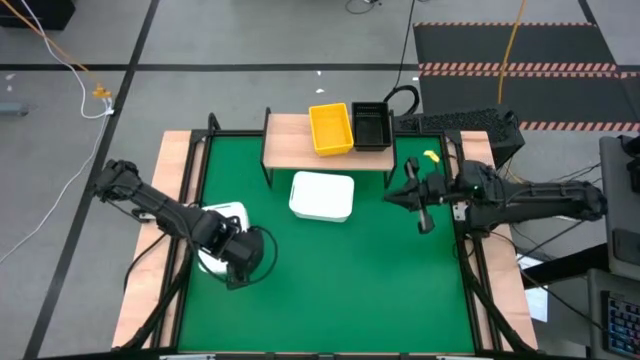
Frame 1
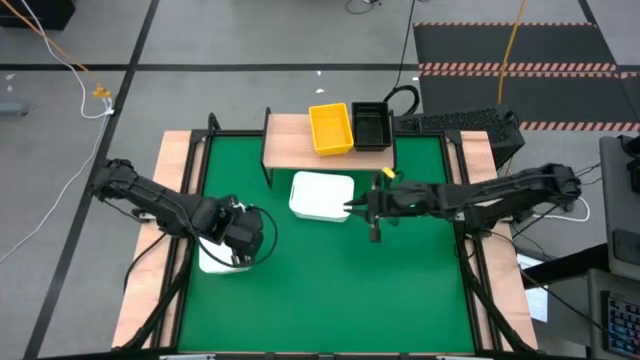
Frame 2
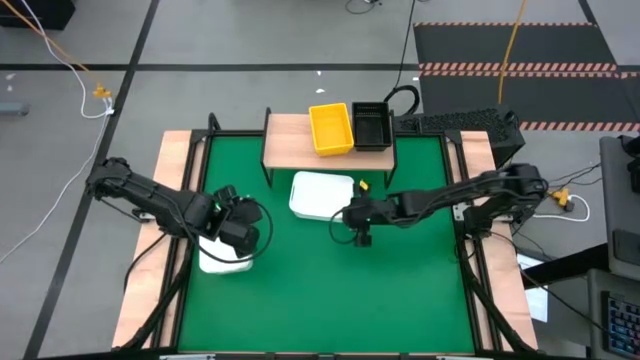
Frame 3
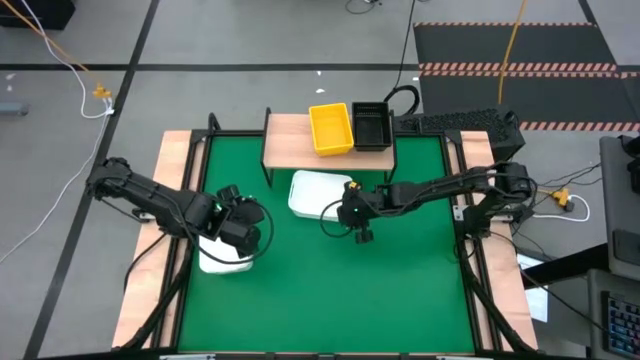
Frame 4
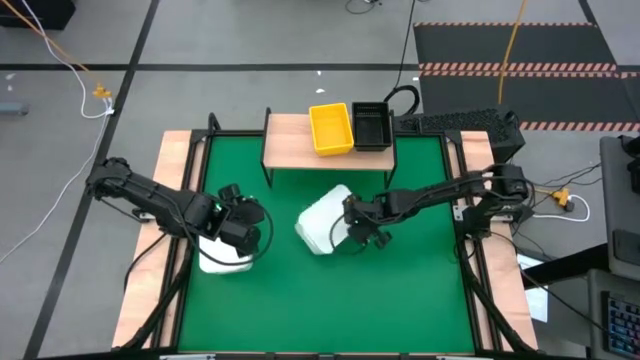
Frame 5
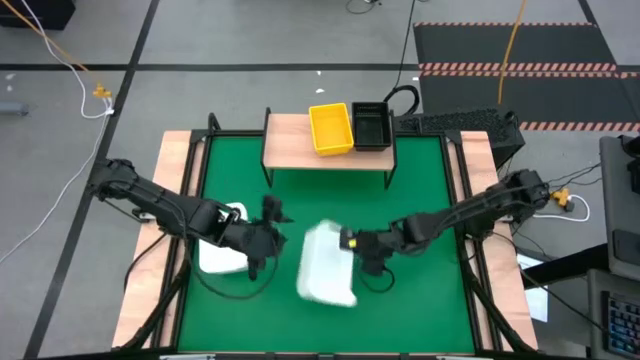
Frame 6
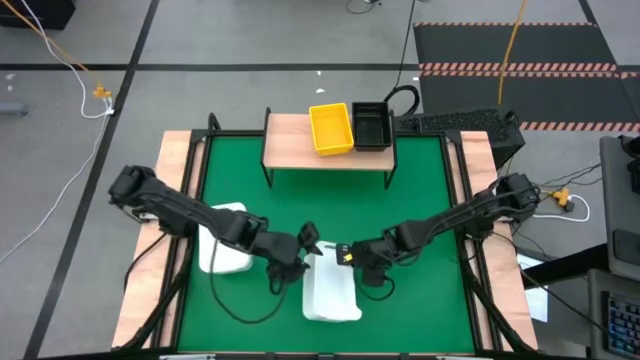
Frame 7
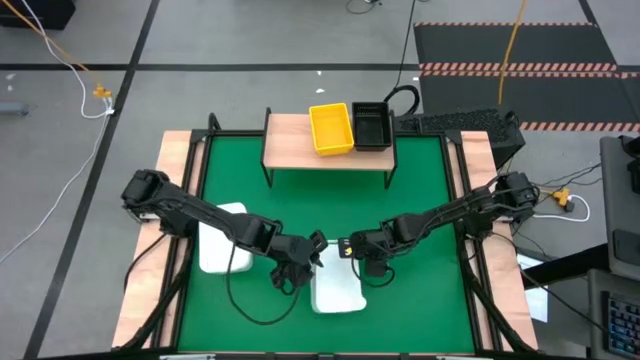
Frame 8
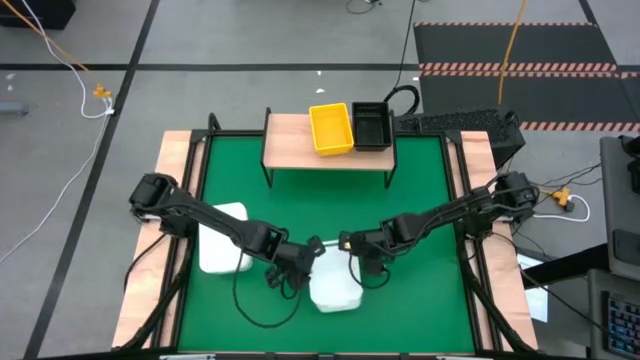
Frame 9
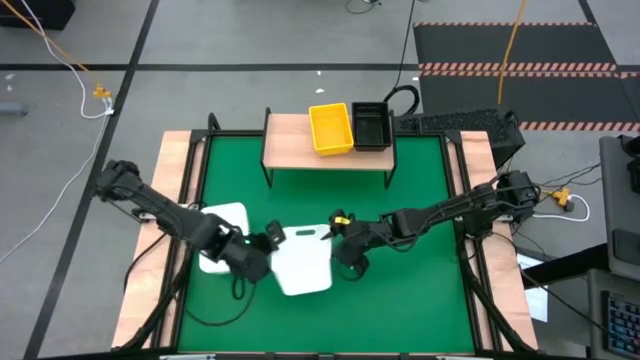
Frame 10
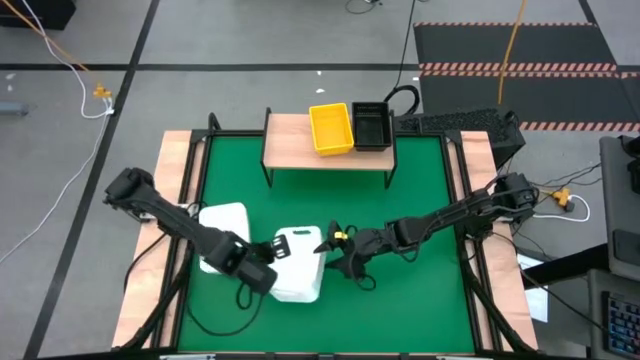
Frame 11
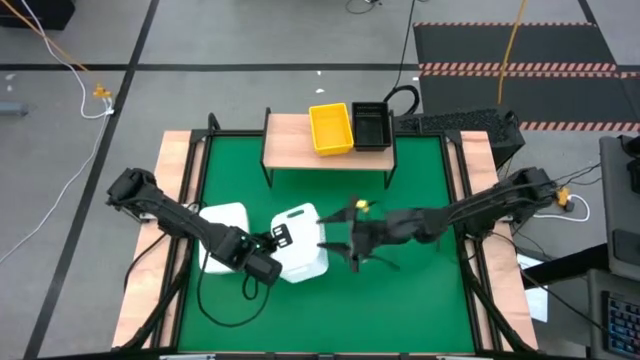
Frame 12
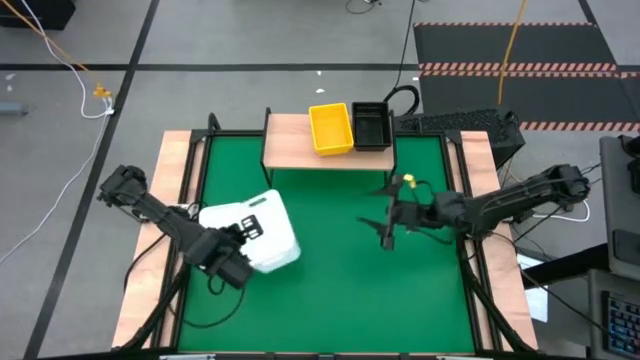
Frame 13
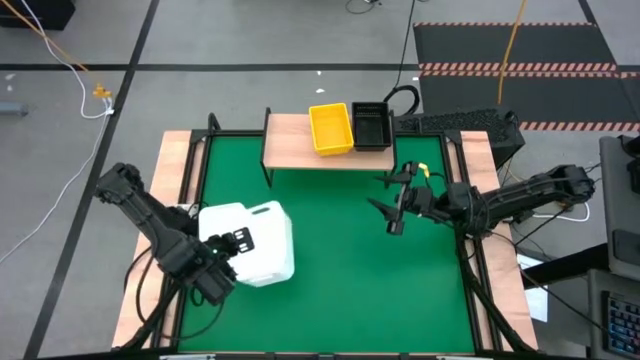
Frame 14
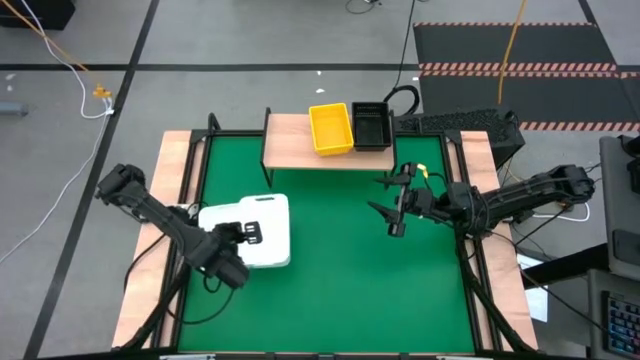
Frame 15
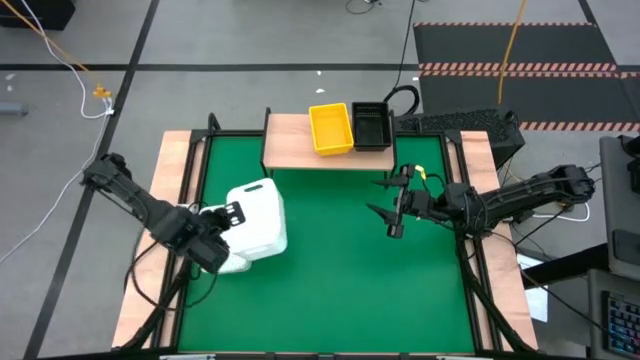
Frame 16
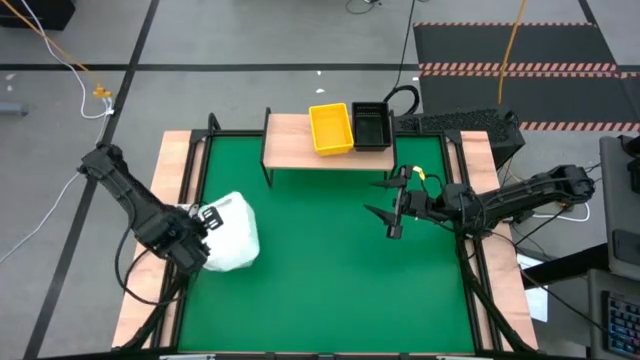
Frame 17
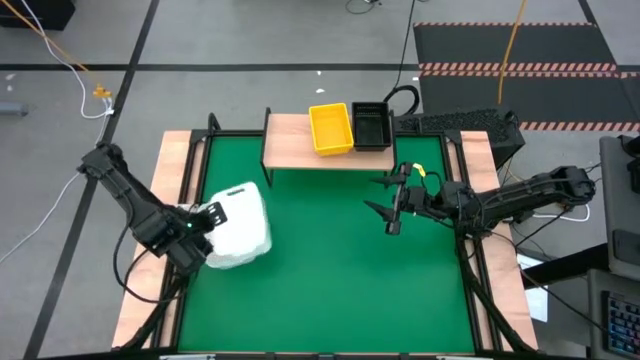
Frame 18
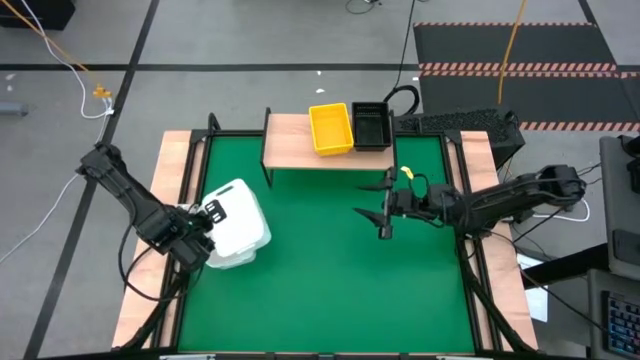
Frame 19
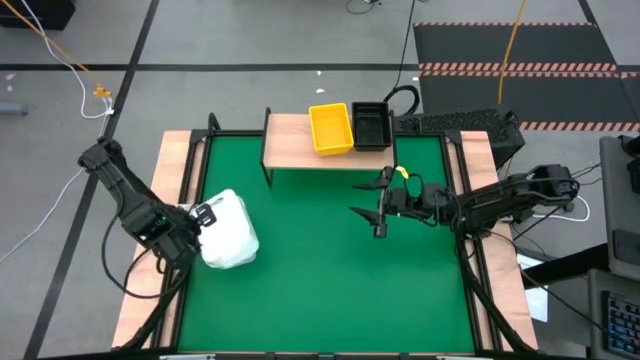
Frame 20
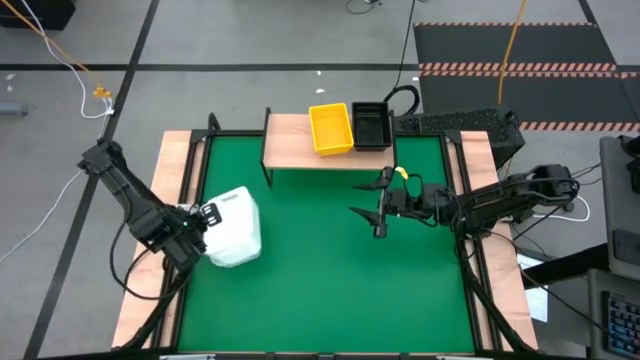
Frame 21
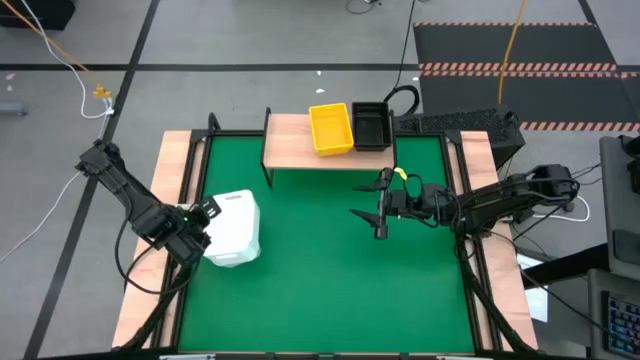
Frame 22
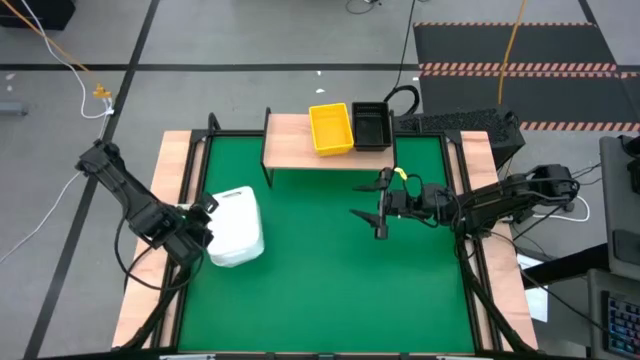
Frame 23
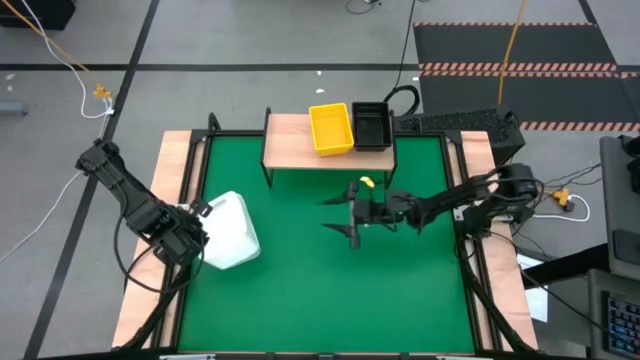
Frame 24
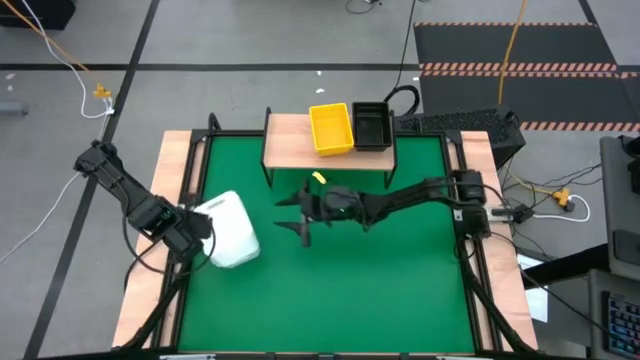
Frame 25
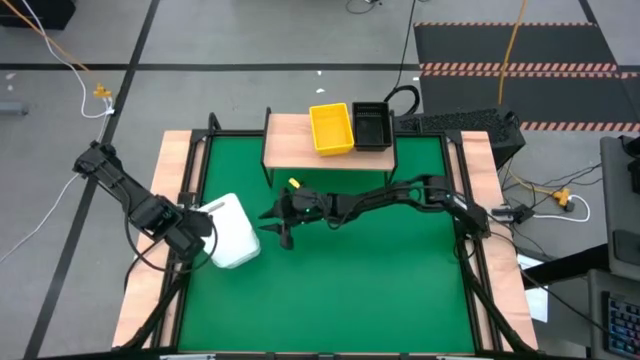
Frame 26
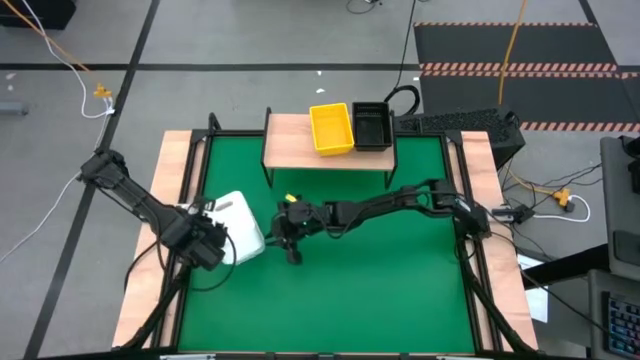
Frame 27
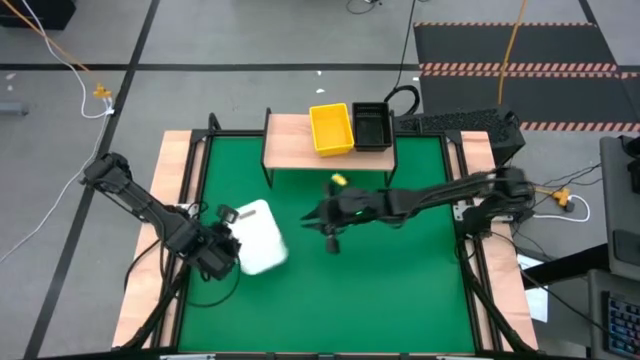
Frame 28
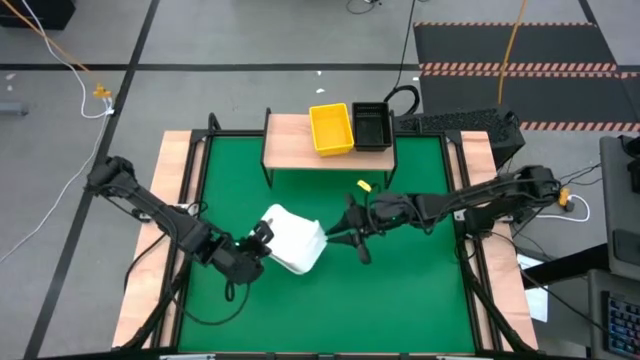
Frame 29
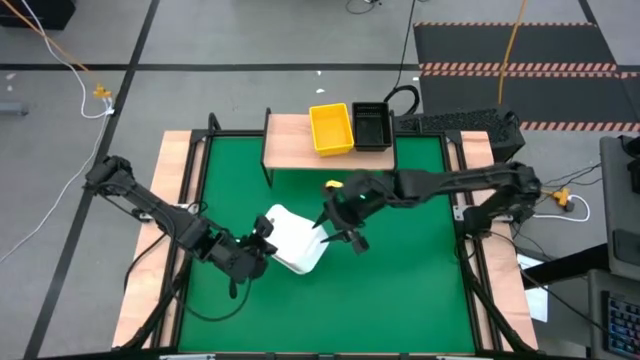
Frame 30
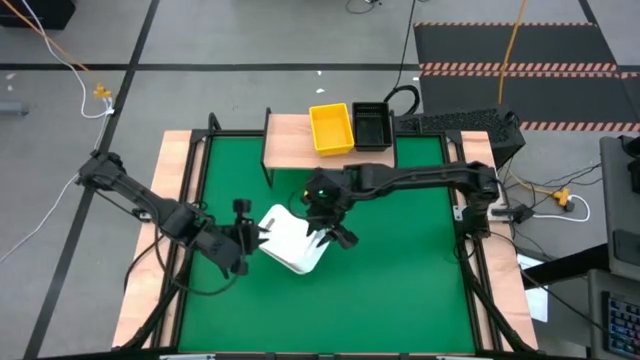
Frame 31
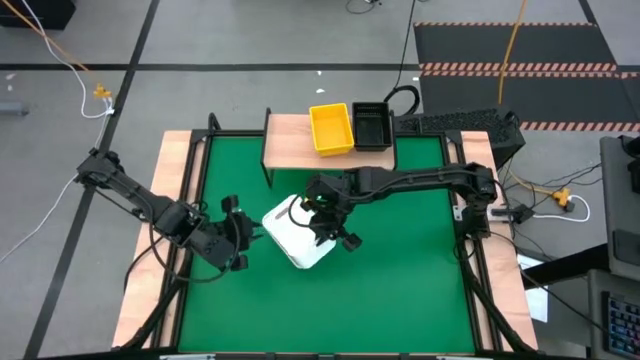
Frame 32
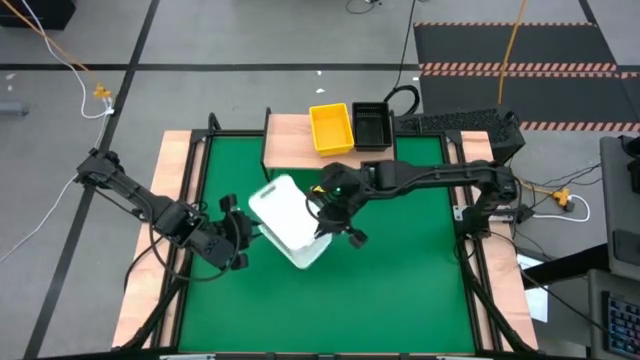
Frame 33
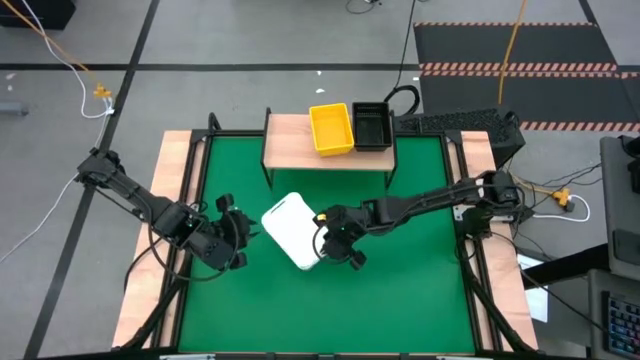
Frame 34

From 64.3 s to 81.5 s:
Task: Stack baskets on shelf by color
Stack the right white bin on the other white bins

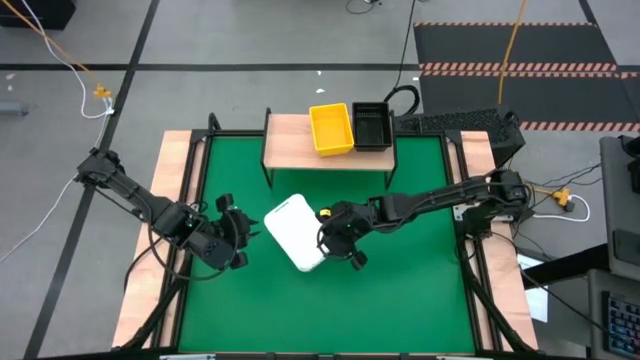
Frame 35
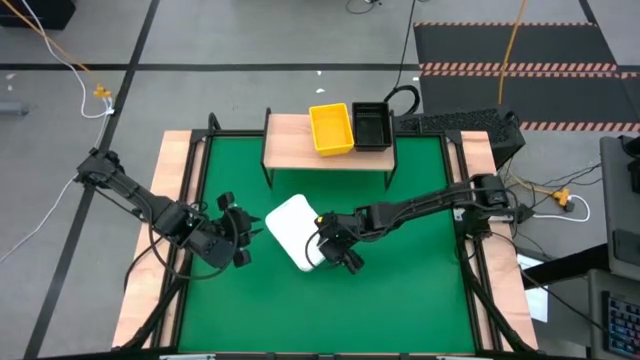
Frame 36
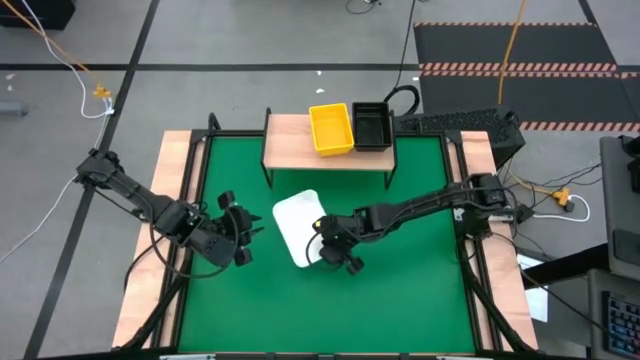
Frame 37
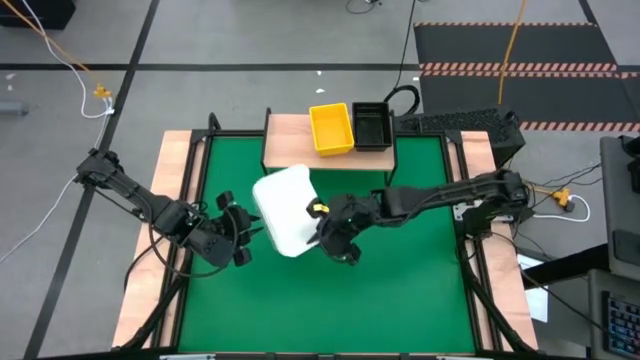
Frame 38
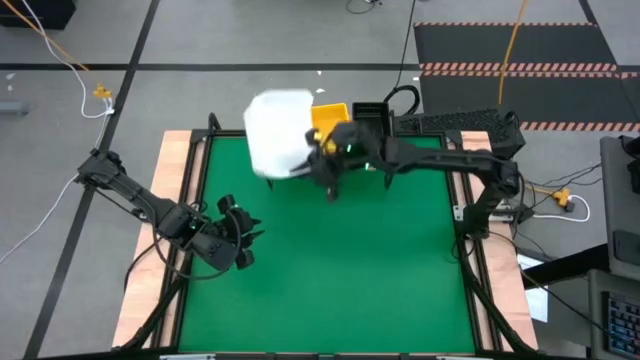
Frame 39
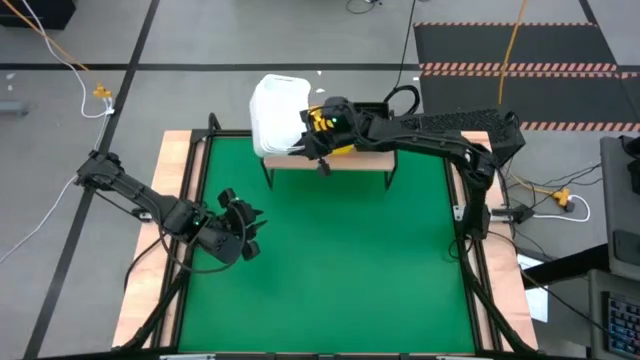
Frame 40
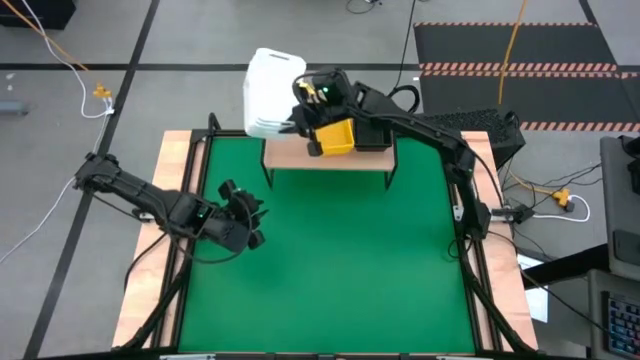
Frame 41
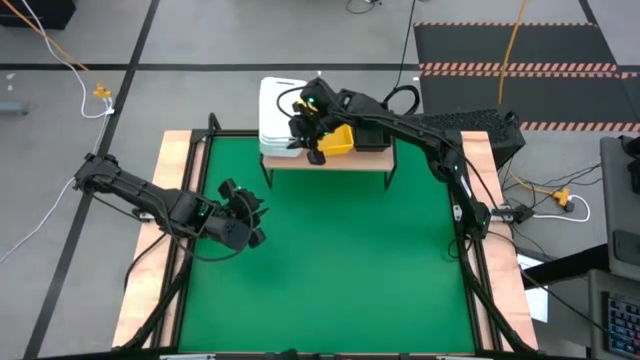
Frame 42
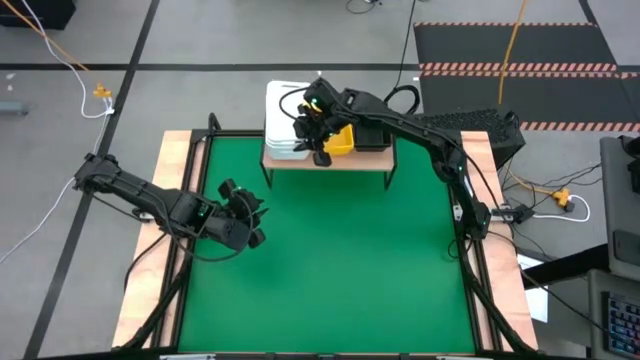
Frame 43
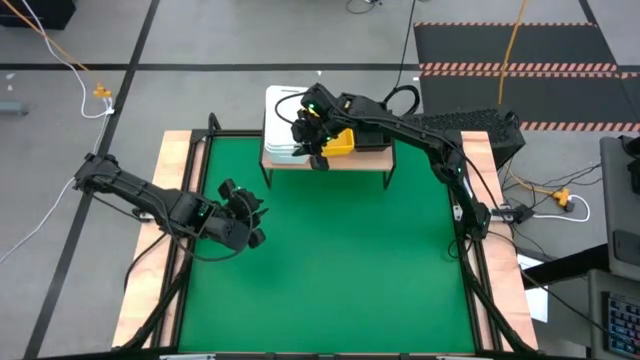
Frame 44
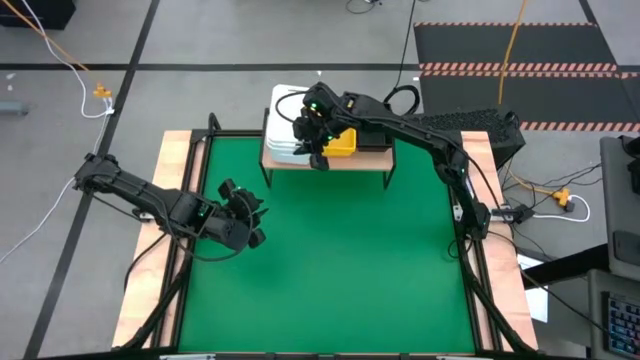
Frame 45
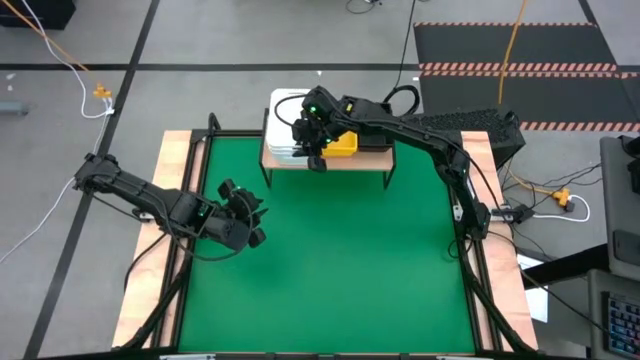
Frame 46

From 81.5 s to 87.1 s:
Put the stack of white bins on the shelf
